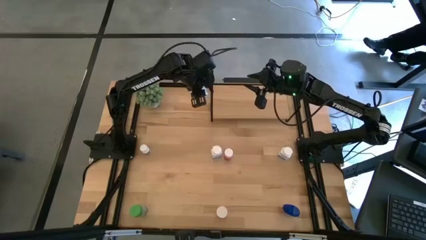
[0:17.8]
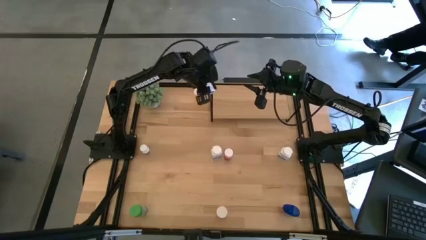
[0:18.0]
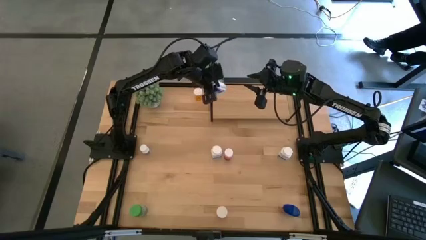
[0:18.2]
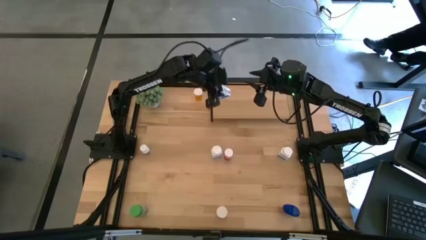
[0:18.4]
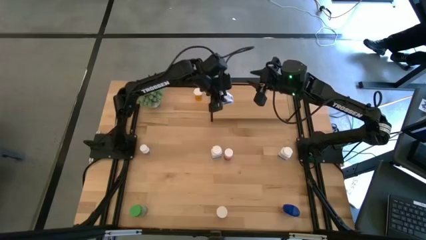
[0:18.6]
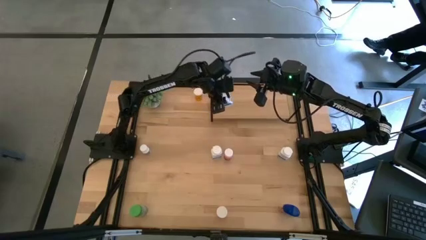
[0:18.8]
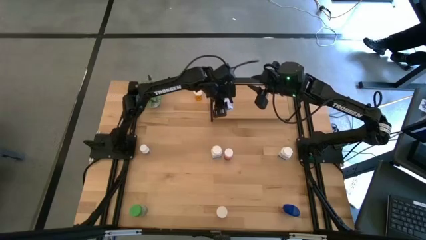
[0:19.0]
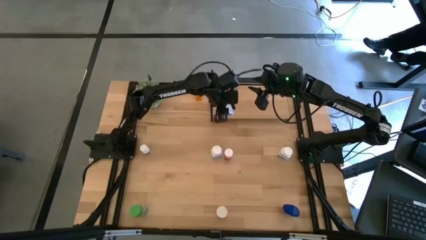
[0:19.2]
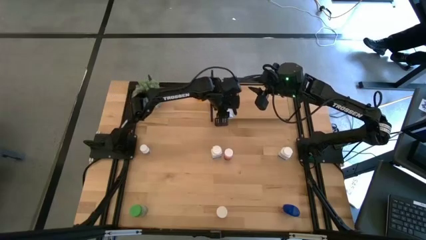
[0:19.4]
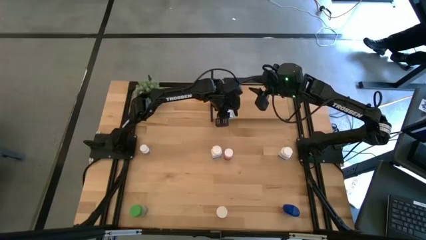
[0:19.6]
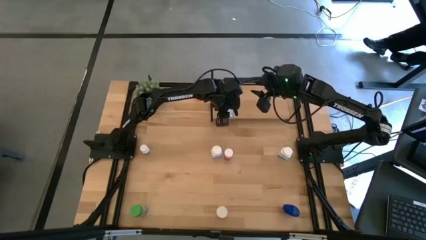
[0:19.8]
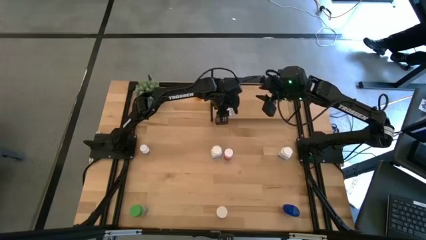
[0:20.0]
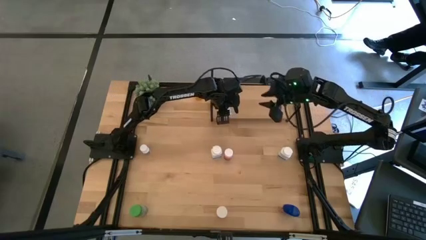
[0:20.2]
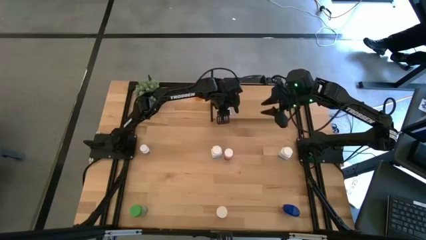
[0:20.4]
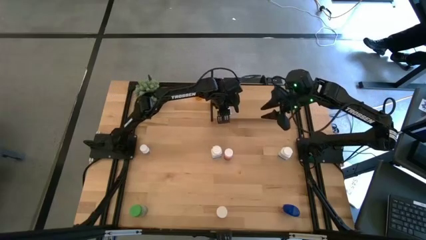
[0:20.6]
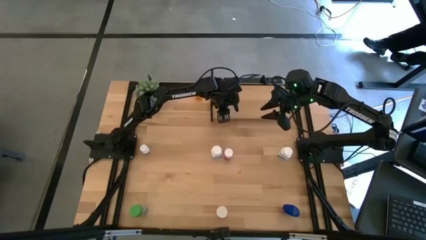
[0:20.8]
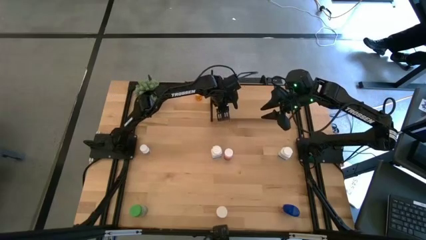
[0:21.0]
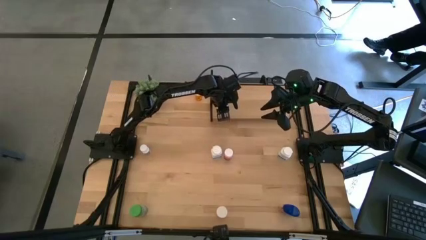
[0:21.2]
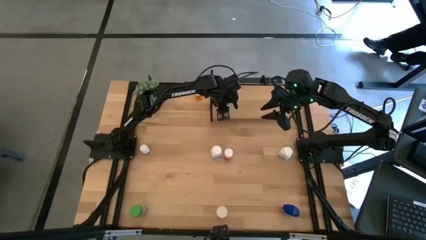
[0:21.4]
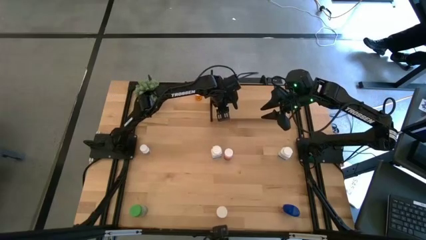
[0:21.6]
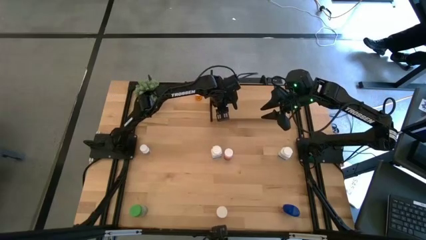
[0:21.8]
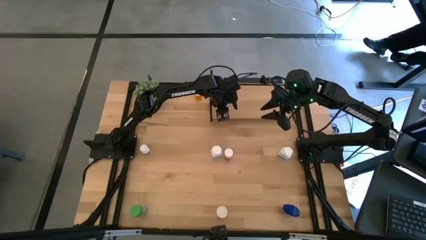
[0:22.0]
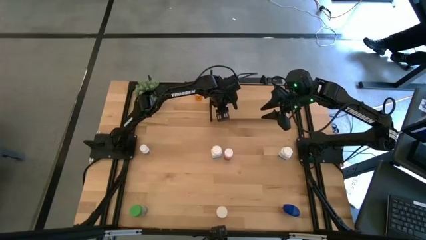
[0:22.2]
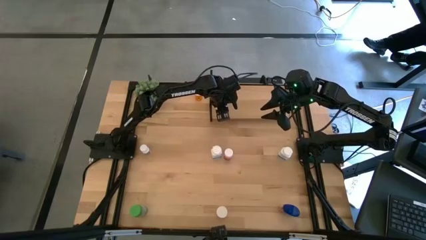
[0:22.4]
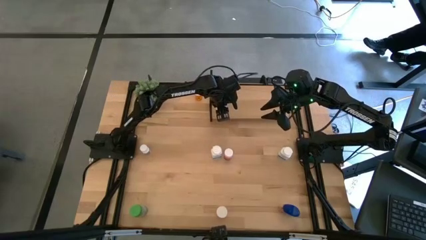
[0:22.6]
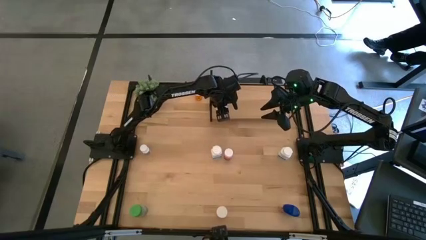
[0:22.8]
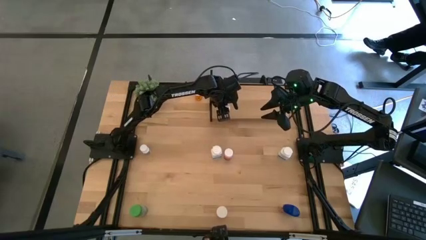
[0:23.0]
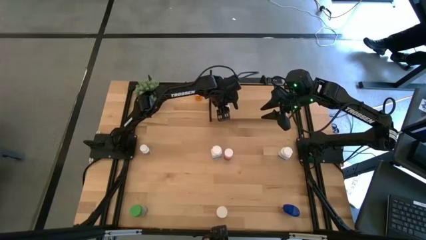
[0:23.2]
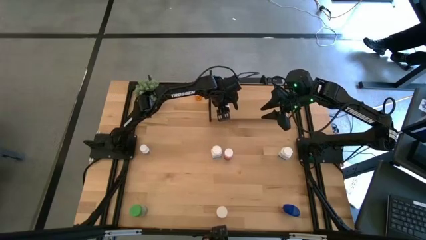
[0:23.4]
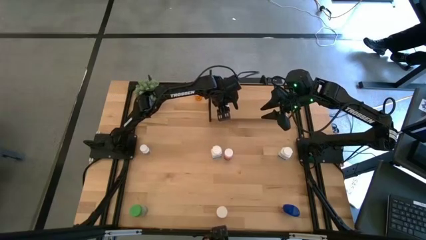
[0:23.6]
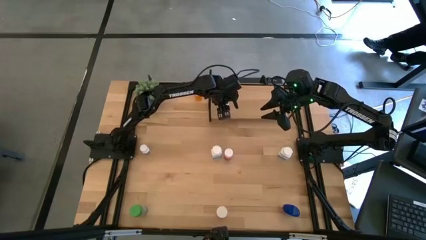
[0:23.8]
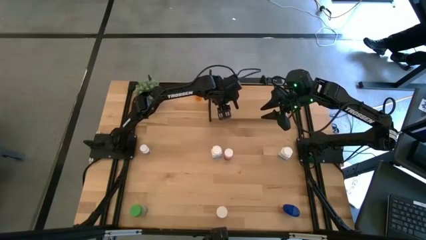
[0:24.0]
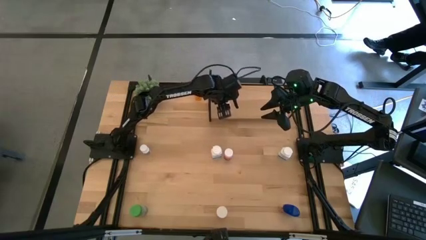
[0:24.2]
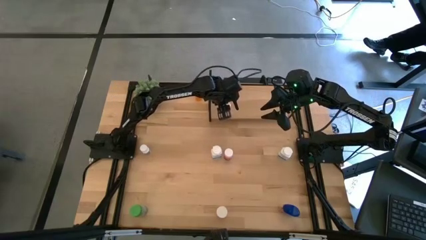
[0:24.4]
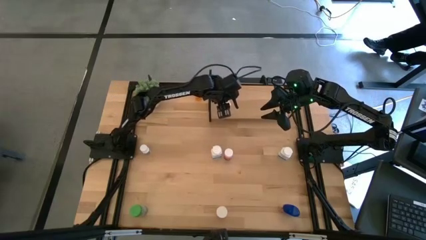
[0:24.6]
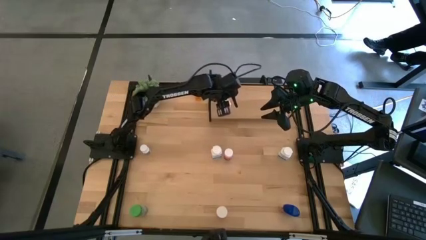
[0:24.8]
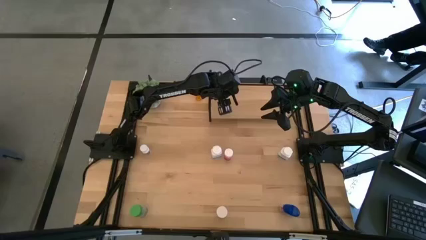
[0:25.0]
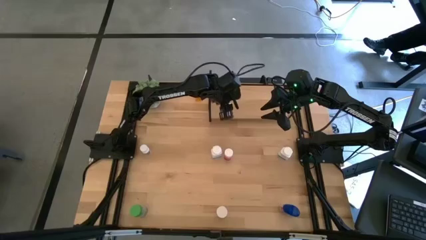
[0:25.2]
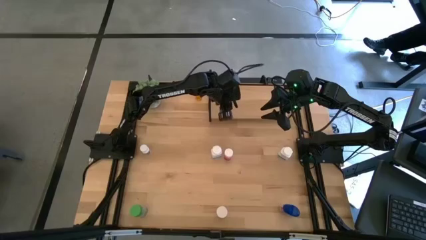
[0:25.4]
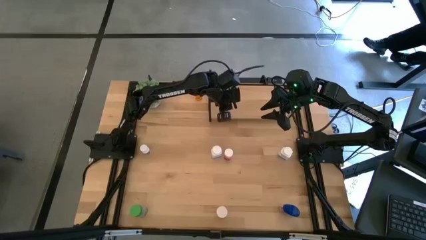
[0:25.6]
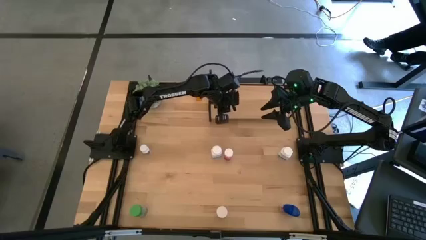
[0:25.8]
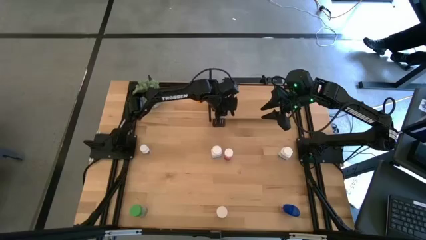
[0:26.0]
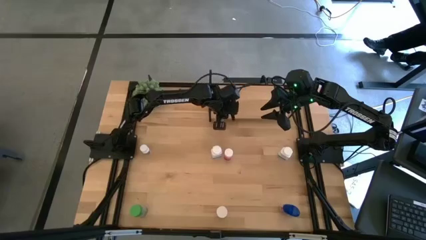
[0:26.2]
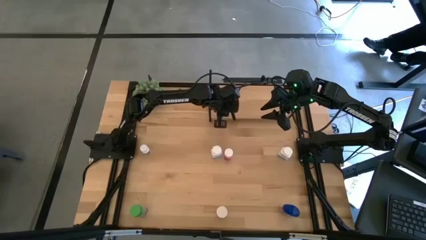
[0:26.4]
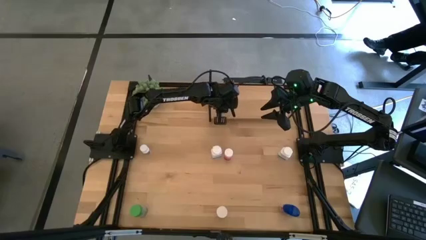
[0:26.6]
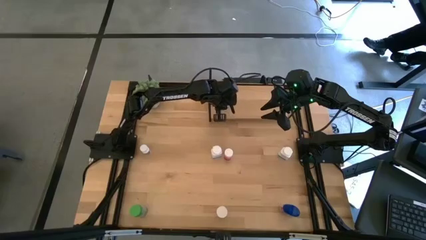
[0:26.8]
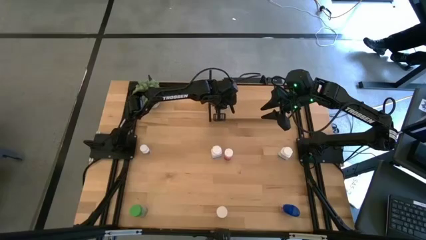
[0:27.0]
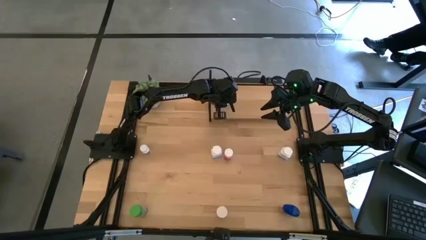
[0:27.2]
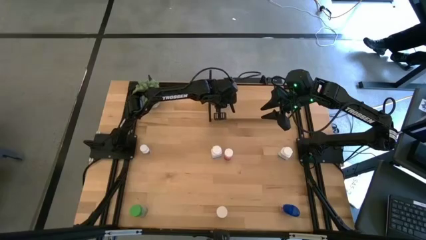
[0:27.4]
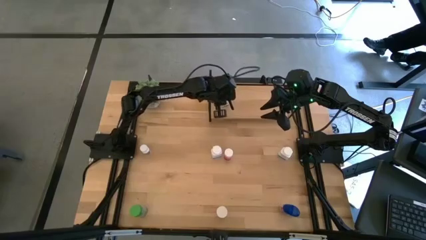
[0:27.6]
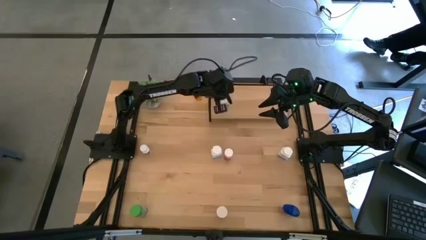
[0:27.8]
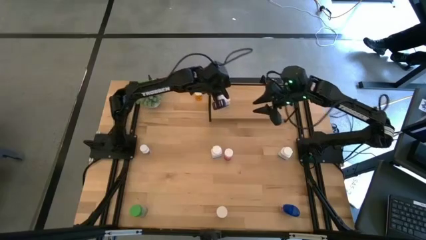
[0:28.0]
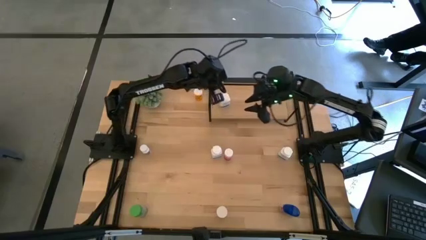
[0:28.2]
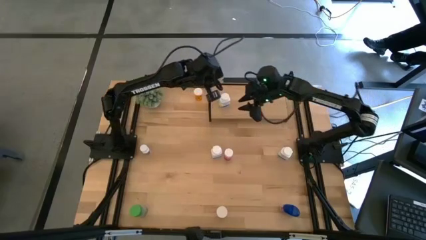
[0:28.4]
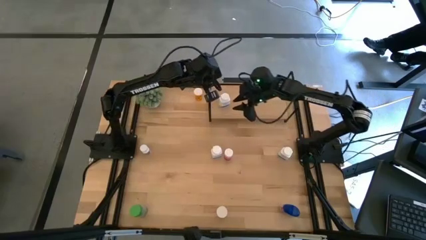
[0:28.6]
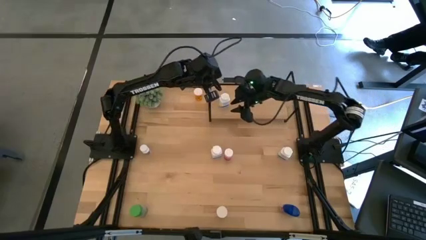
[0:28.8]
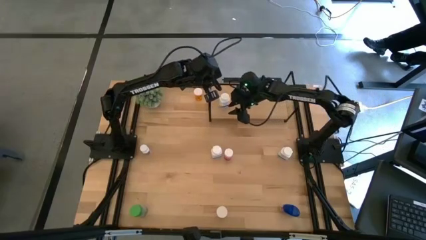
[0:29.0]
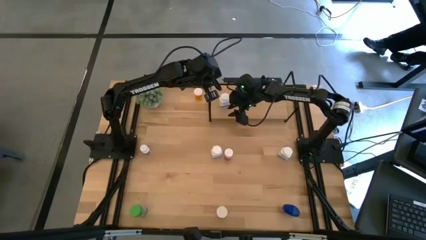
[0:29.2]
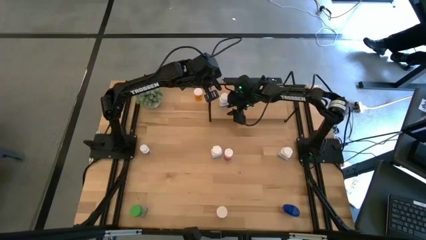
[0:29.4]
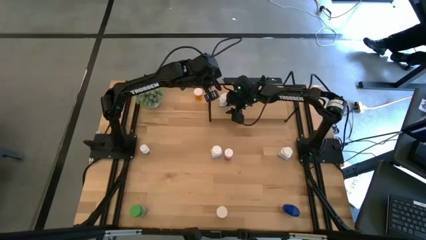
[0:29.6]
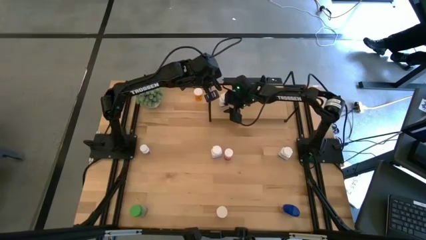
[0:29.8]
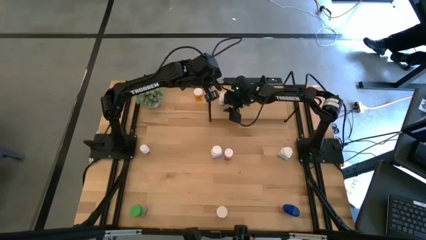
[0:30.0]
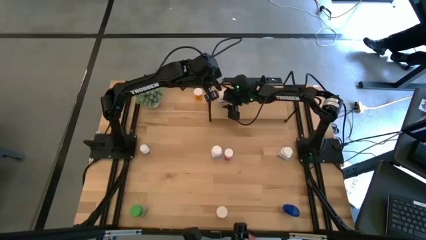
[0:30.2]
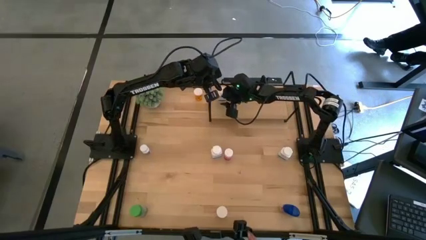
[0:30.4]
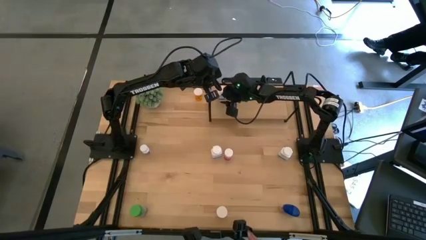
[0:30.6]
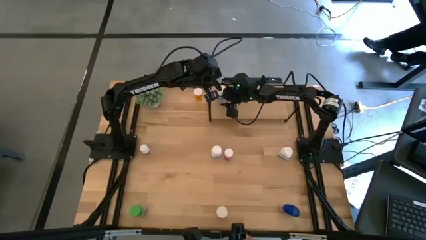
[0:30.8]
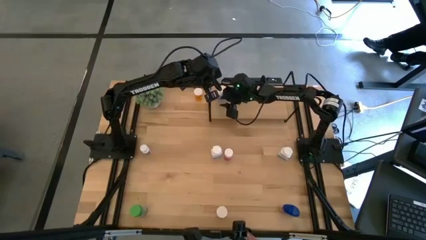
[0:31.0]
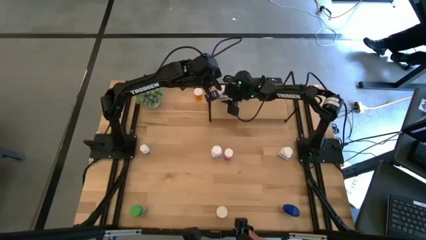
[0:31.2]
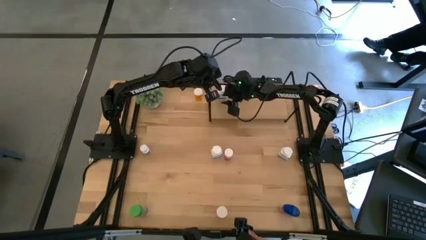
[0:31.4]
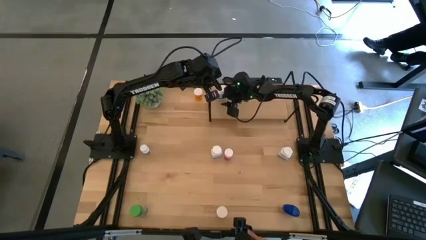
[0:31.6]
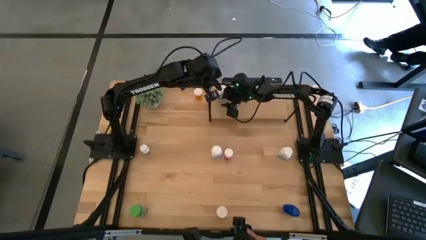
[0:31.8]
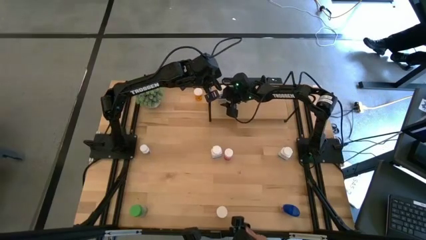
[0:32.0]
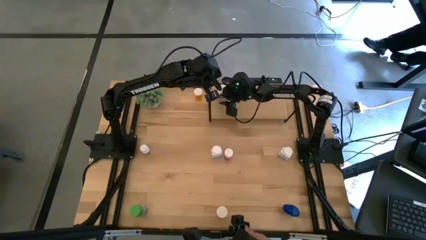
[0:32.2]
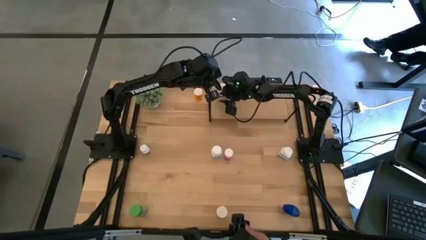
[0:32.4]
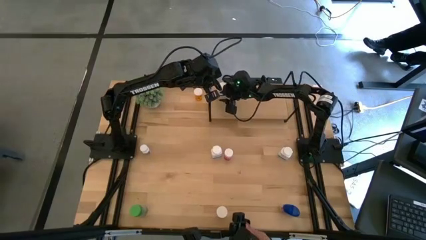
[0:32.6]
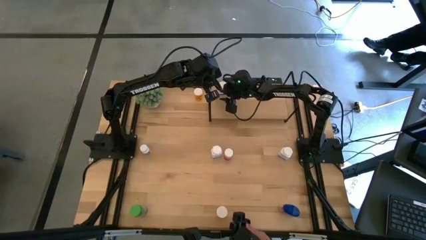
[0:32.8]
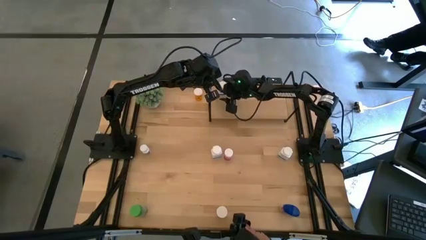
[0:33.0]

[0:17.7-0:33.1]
Task: Pick and place medicine bottles onto shelf by color
Put the white medicine bottle on the shelf
